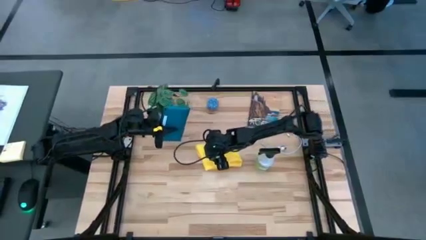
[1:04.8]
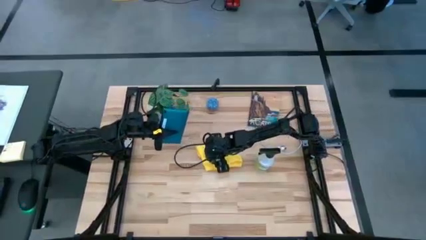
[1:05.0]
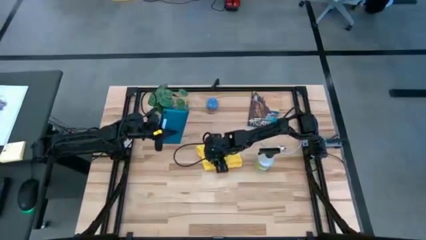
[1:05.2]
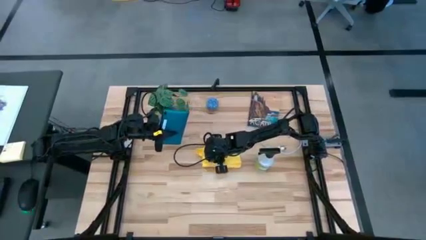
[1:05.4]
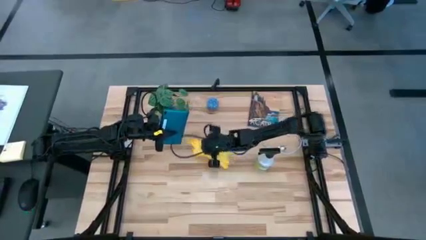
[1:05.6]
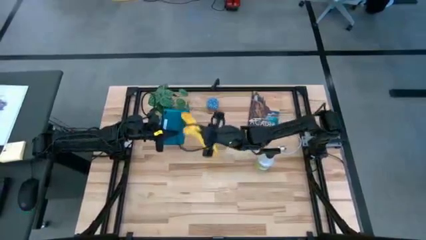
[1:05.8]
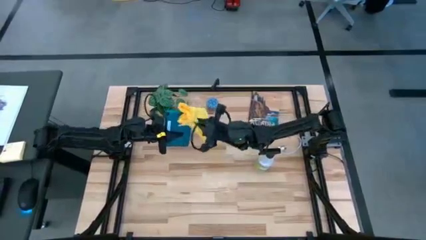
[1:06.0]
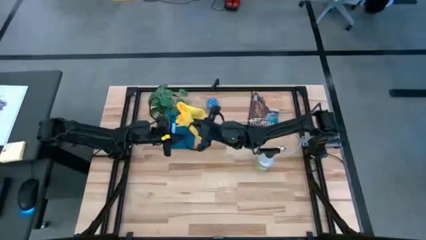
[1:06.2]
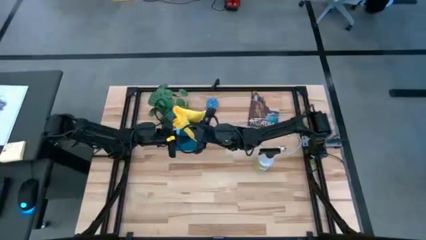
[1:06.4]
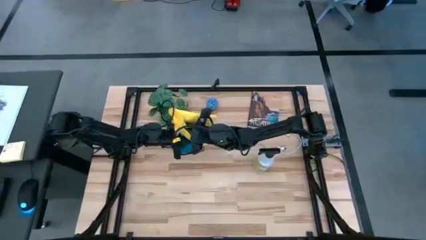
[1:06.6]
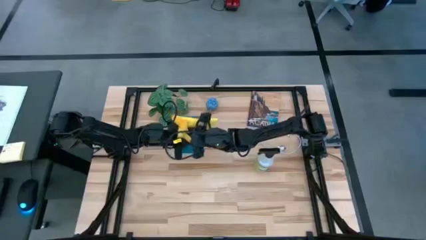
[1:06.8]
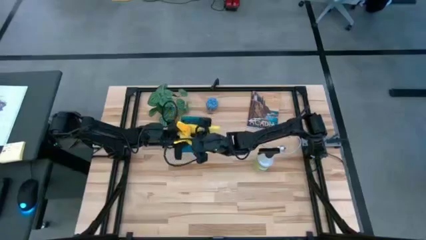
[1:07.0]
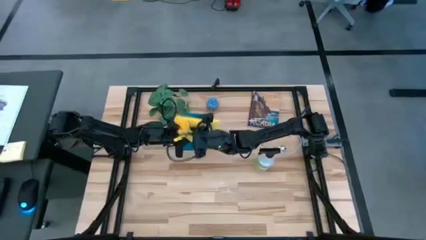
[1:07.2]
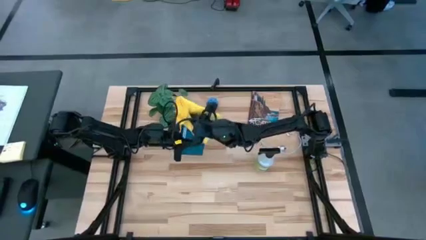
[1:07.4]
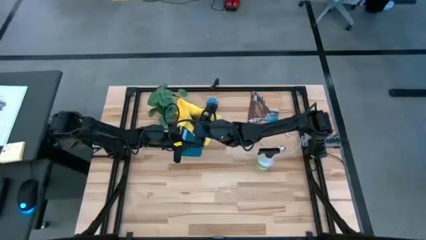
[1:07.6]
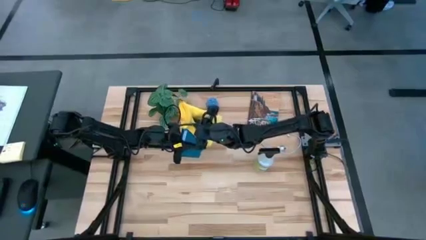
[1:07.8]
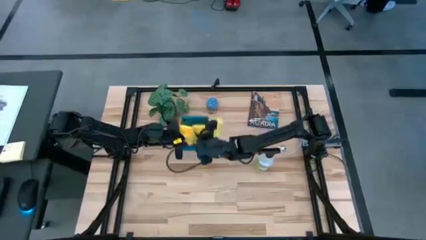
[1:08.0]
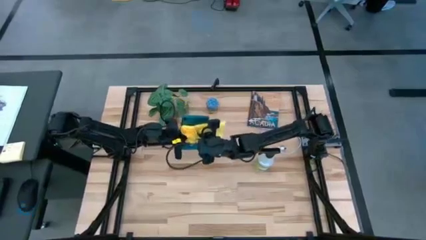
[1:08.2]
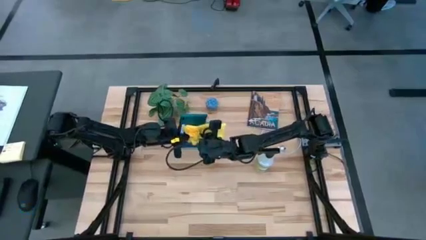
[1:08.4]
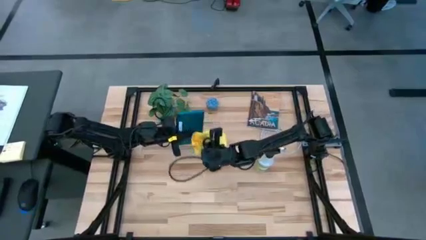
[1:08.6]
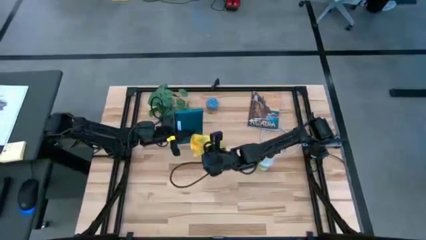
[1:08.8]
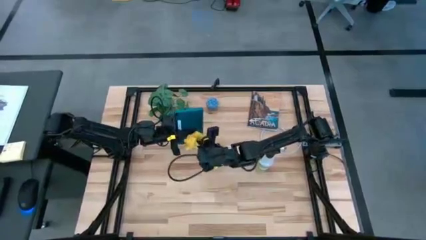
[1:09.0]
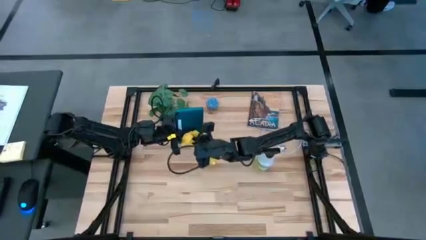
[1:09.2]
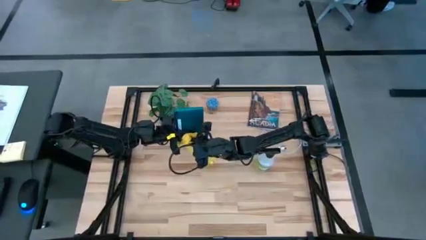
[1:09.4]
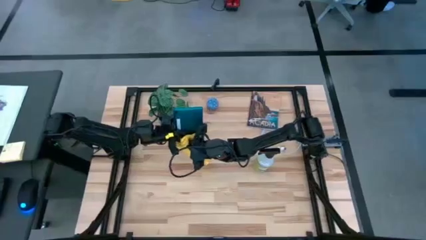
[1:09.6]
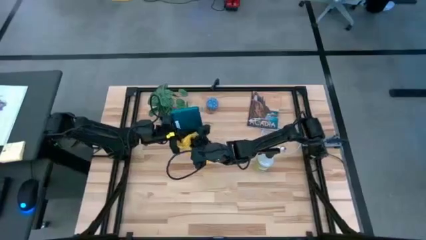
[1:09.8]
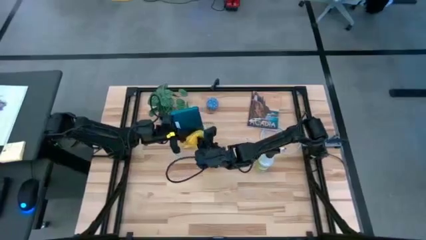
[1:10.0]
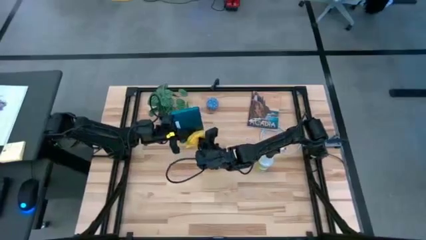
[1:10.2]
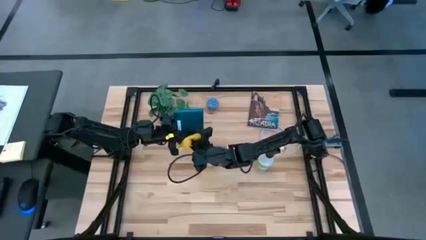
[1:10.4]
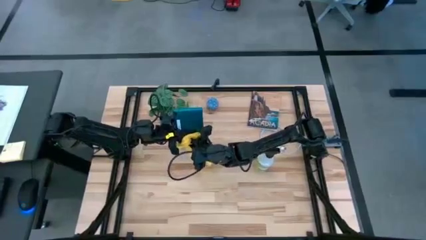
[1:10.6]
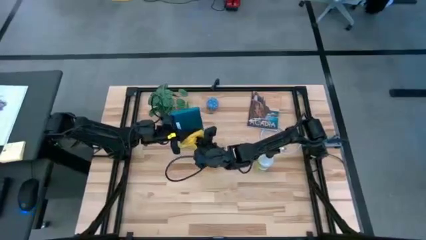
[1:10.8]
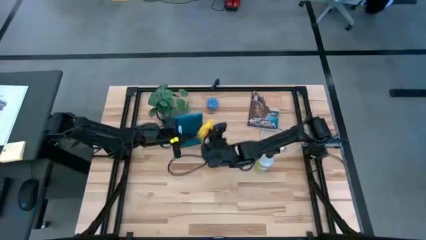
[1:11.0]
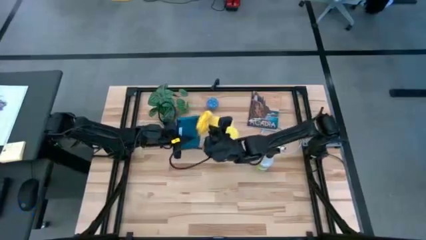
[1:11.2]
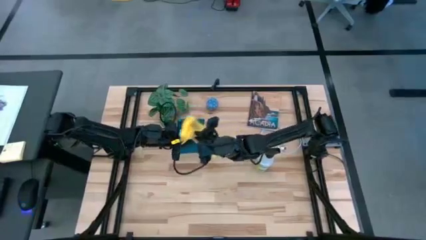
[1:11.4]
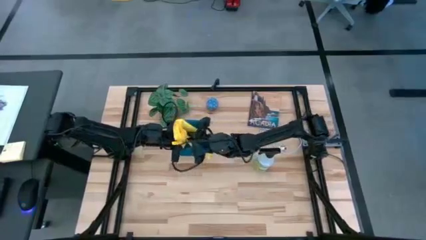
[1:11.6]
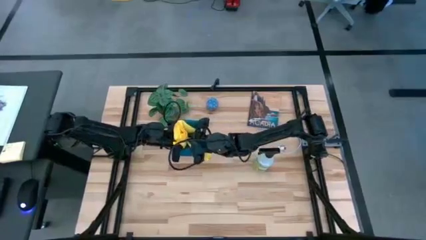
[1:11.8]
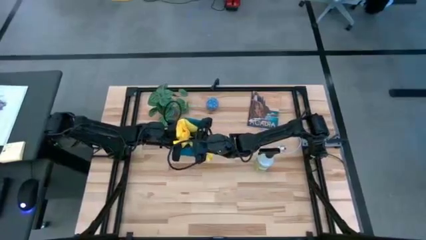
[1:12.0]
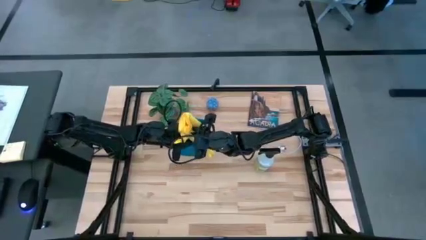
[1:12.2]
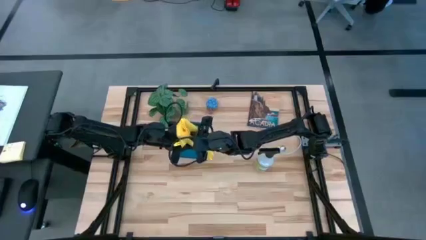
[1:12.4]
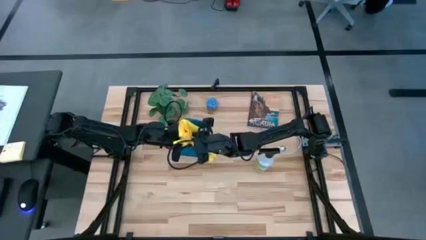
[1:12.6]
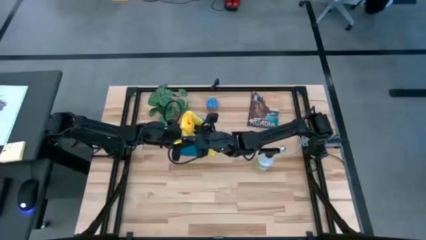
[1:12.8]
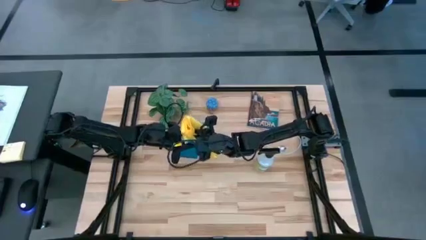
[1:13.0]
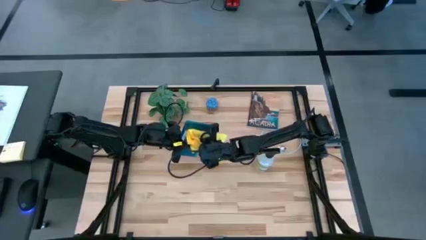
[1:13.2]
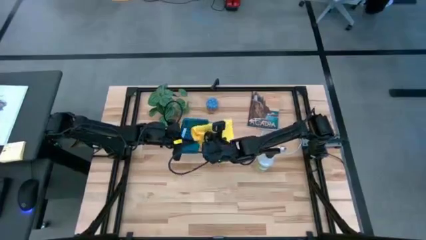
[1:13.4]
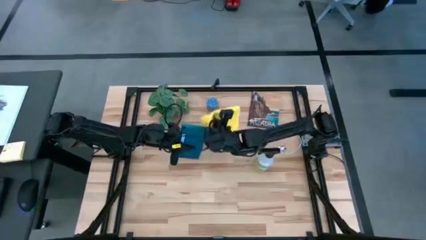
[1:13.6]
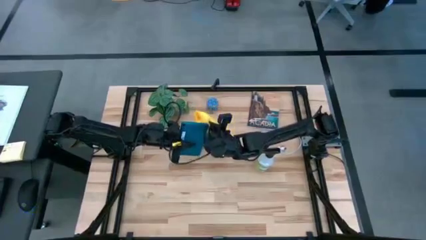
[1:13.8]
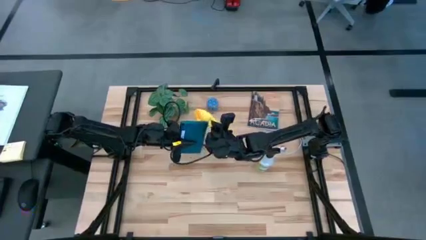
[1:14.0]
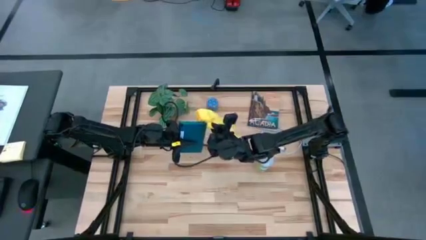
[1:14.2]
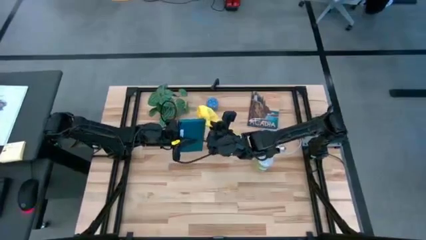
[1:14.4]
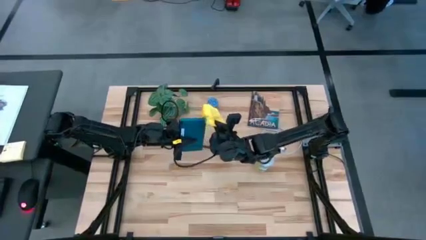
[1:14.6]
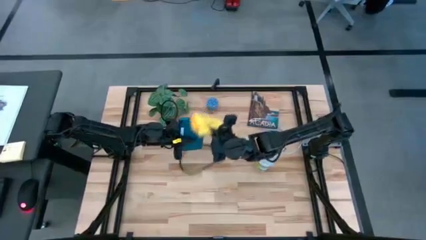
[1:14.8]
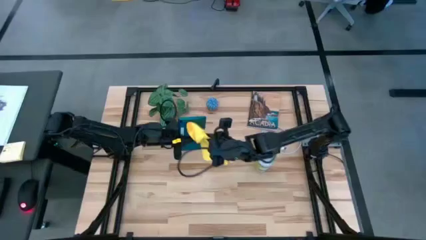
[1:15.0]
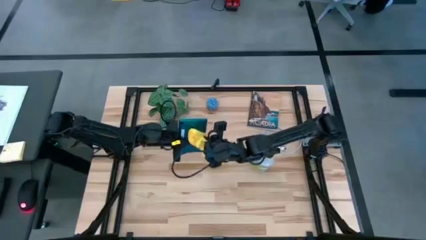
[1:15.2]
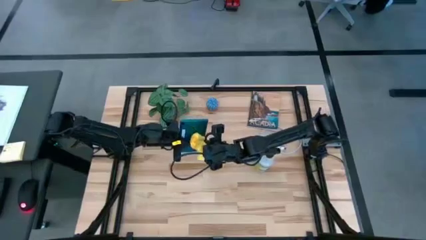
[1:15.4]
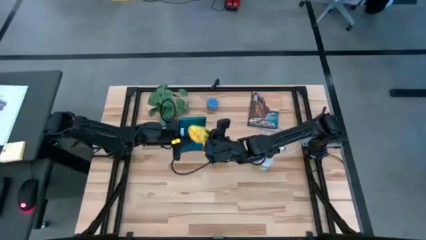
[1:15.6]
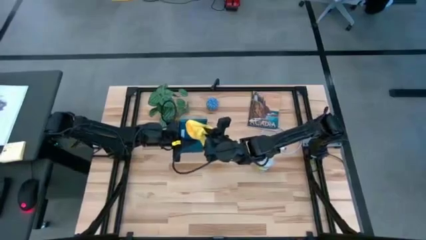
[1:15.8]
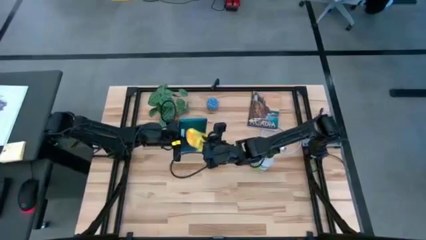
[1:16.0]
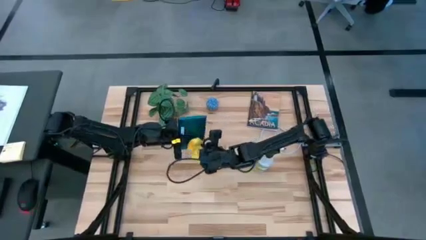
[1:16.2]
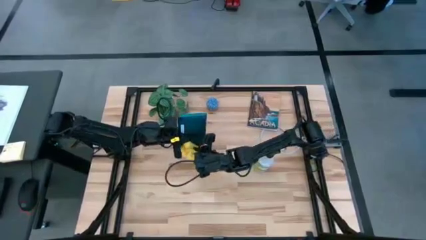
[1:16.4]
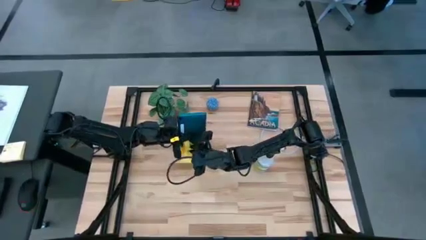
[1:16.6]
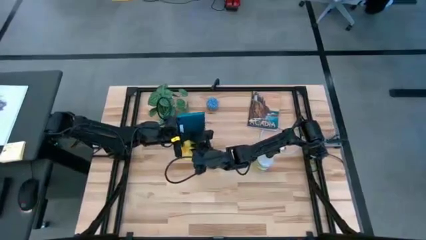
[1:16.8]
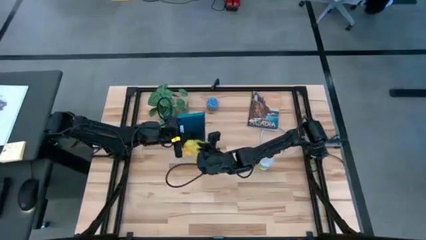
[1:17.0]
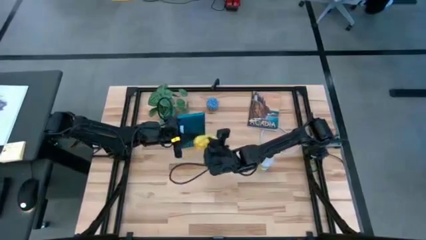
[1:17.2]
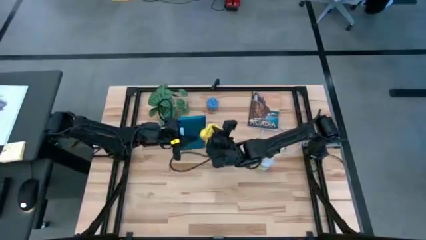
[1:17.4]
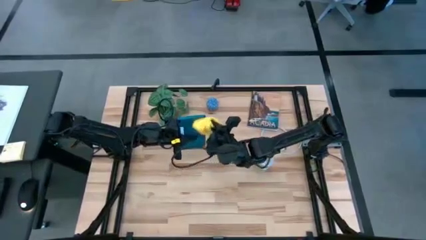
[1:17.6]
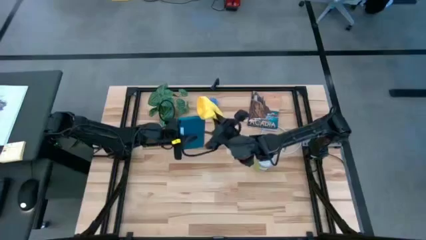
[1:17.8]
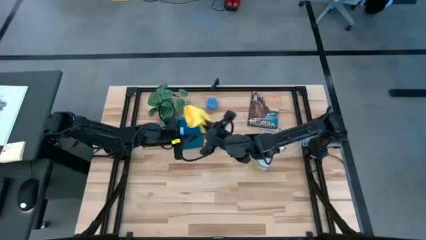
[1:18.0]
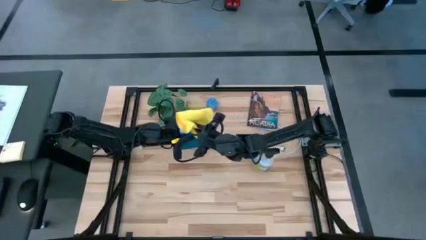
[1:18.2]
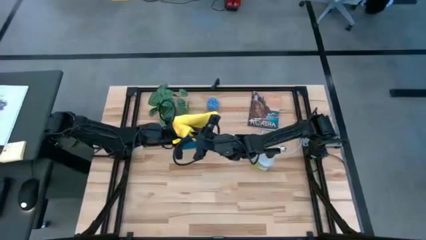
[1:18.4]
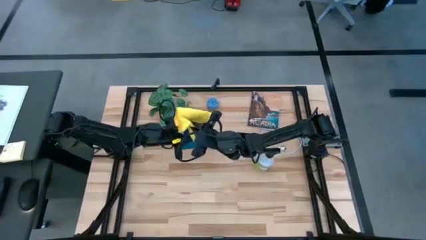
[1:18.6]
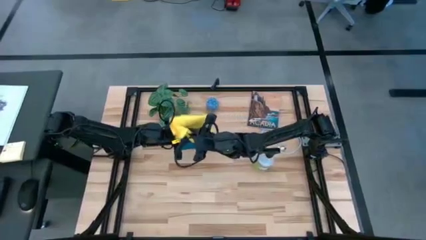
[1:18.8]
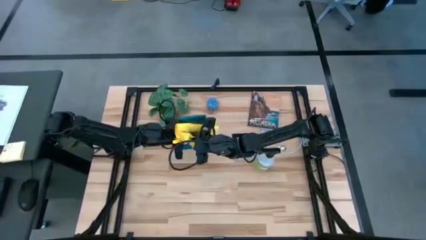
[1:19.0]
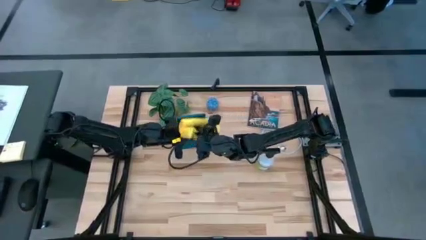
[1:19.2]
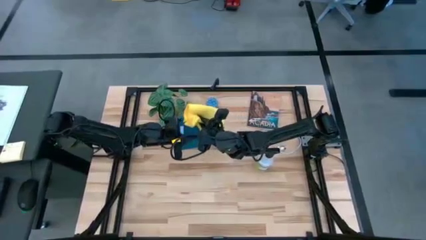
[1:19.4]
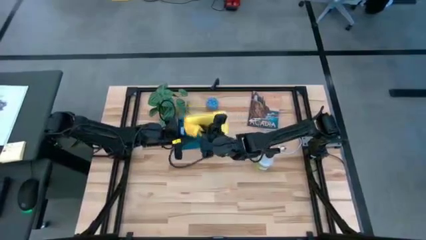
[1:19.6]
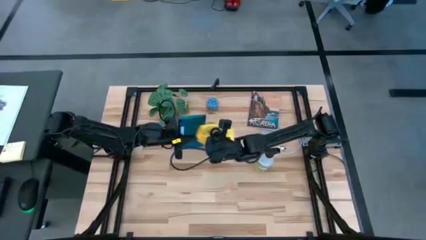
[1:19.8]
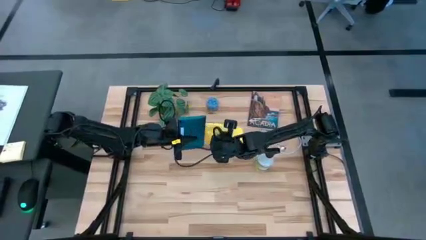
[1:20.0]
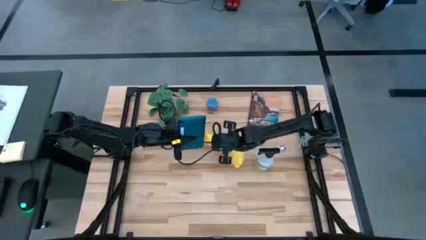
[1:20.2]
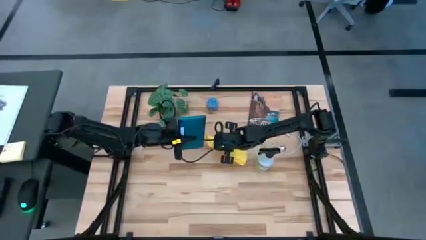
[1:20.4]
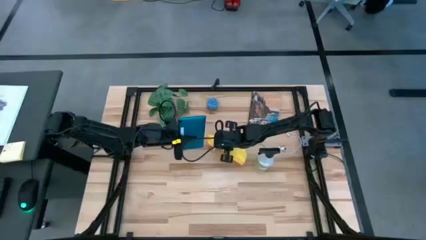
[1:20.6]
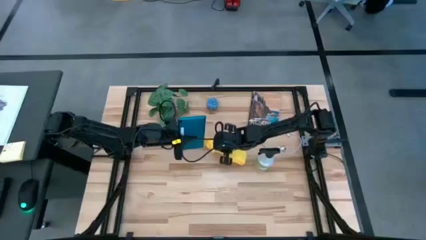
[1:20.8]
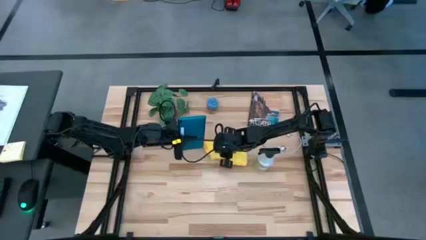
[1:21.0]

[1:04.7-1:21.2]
Task: Apply microfiber cloth
Wipe the front and back of the blue tablet using the yellow microfiber cloth
